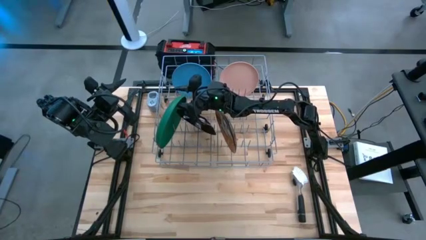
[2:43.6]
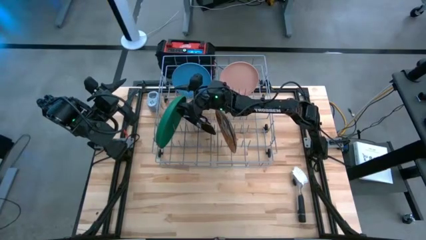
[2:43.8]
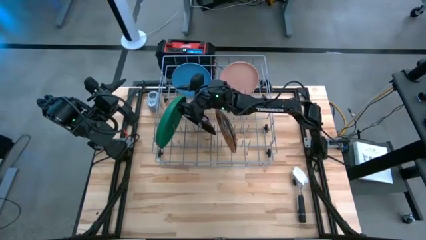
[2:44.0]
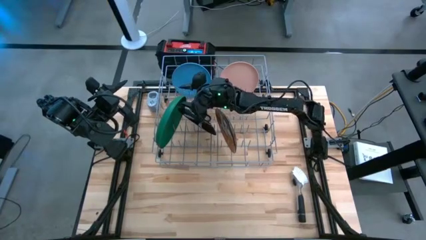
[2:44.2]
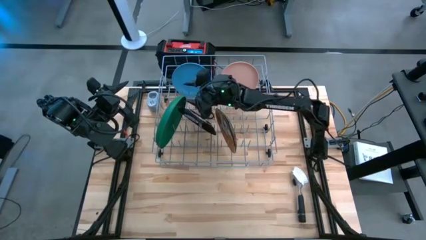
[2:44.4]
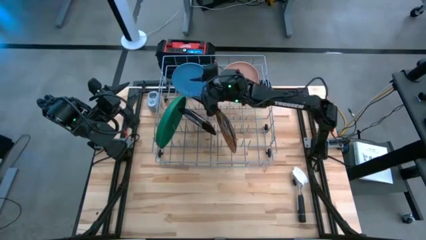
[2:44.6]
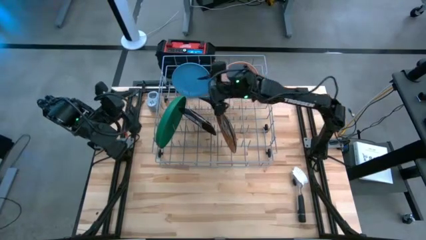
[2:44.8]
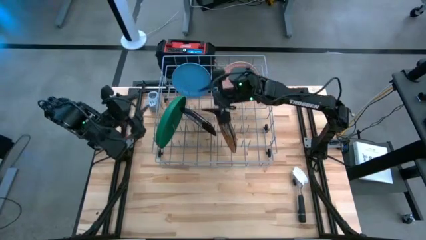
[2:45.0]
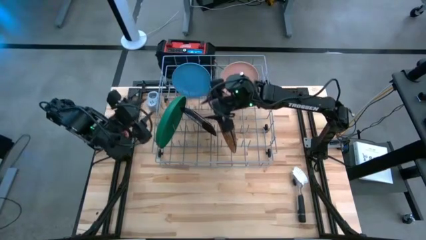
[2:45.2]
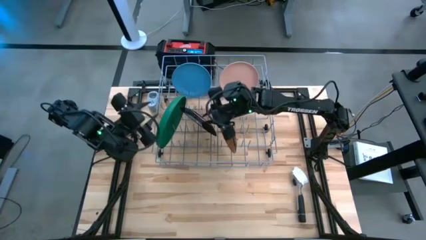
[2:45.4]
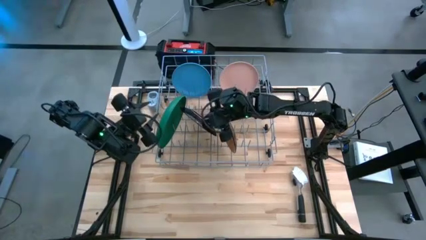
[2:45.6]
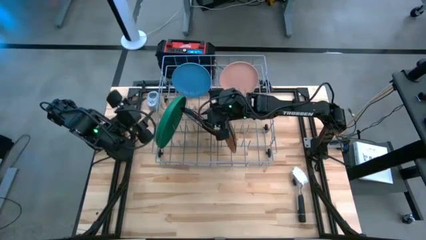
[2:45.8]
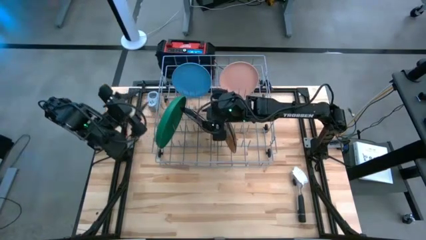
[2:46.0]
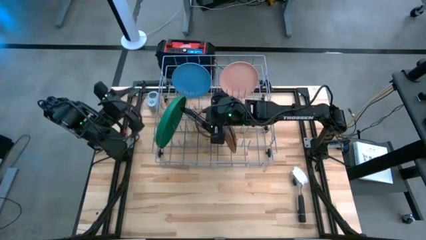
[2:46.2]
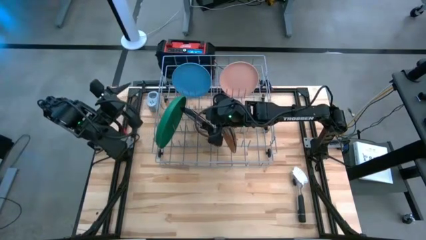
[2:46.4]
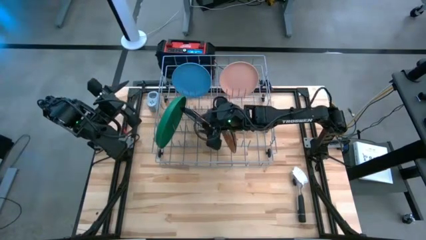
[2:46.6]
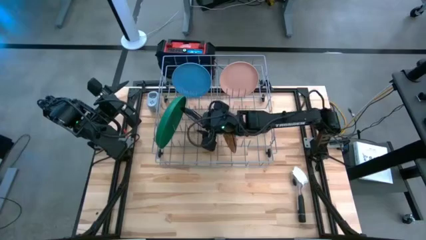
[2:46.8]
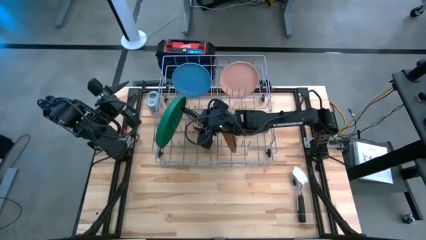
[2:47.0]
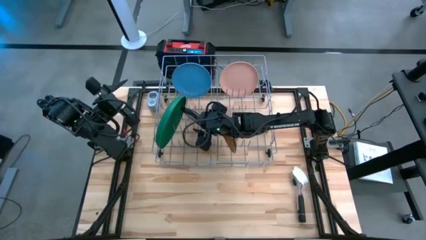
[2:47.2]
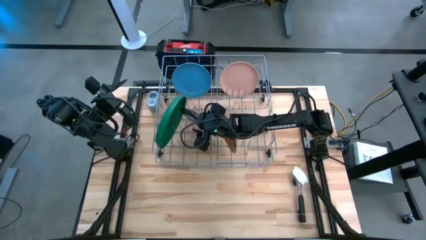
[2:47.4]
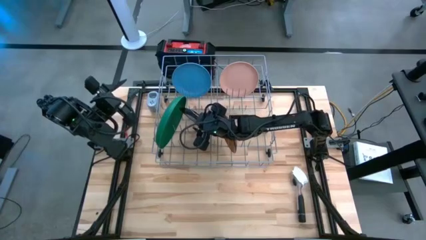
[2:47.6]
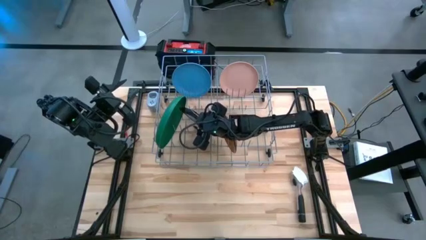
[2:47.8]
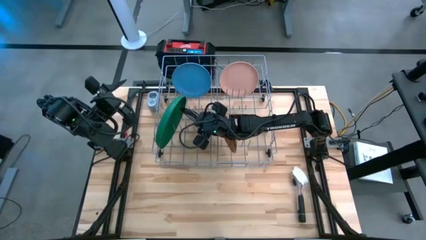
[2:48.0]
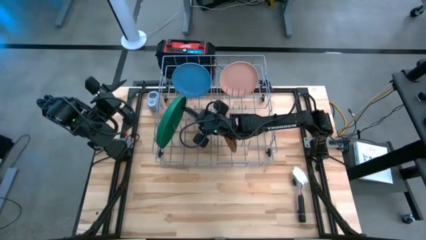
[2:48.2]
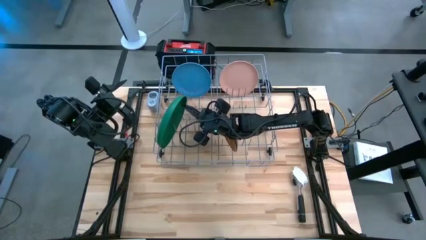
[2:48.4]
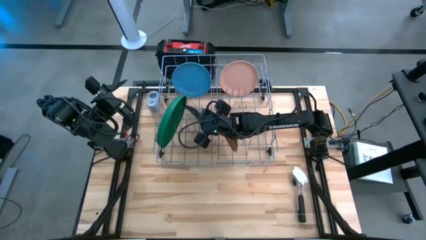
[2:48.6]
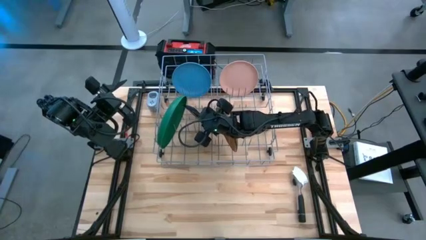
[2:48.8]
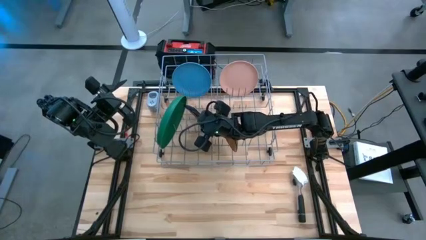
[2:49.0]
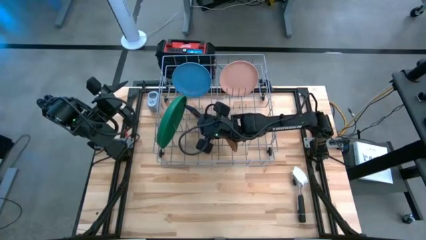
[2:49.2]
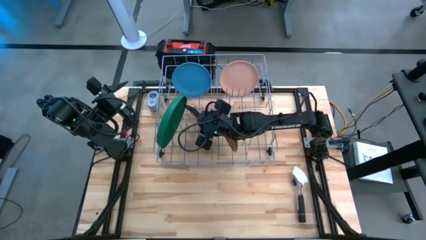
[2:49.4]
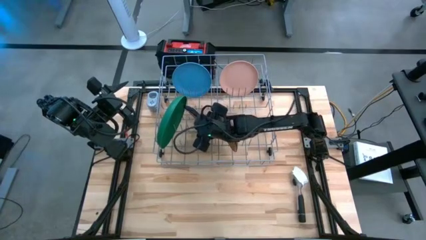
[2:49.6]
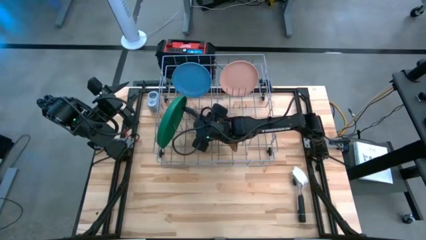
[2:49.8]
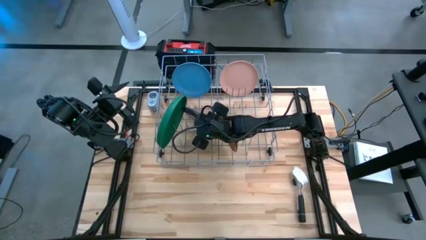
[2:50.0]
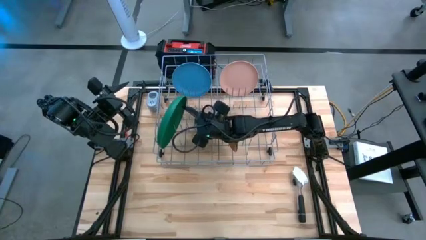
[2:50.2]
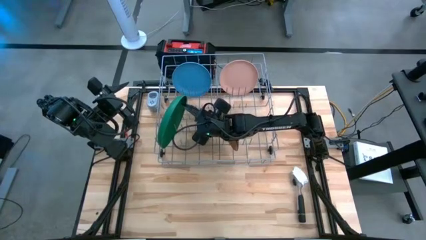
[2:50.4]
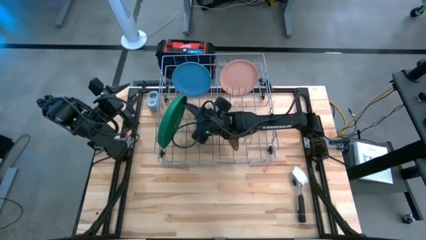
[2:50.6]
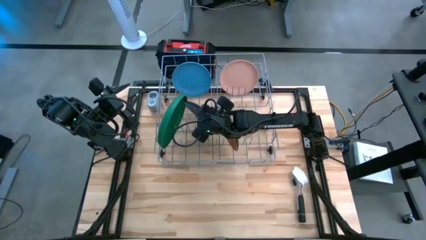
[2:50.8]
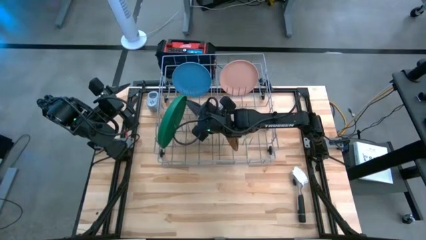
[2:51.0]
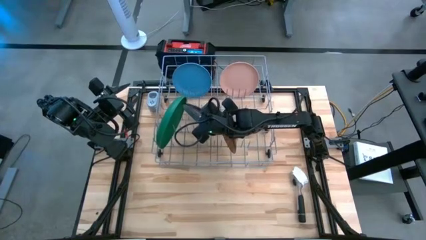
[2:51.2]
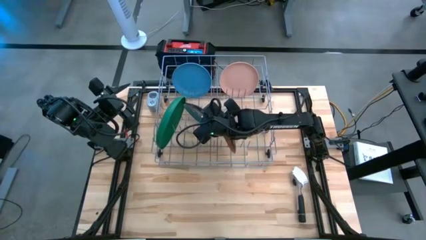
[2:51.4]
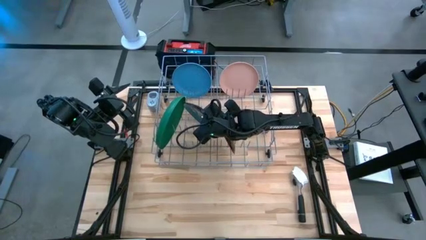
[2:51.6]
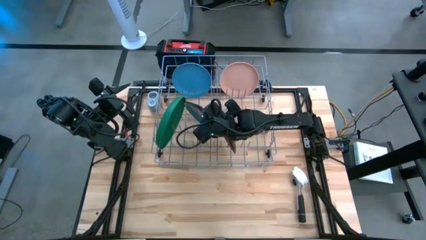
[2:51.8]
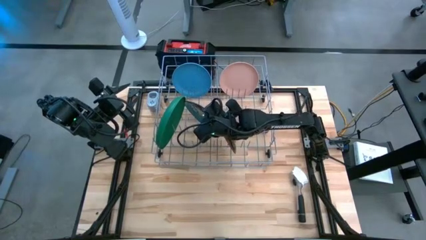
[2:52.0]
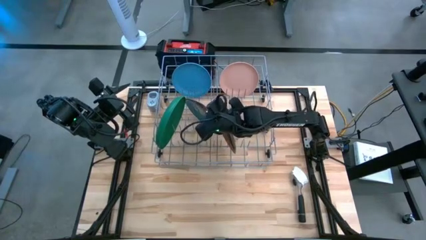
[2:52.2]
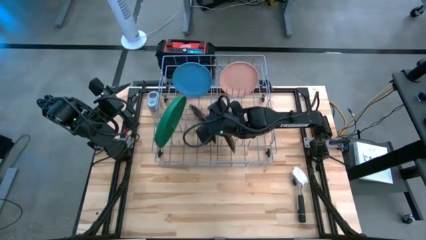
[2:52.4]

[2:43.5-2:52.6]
Task: Sort dishes
Adjust the blue floral plate on the right side of the dish rack

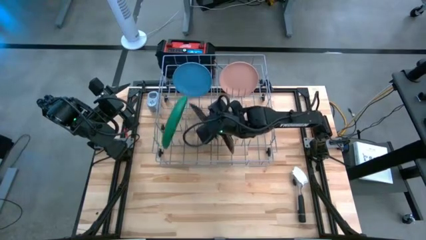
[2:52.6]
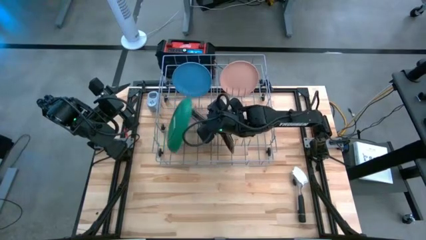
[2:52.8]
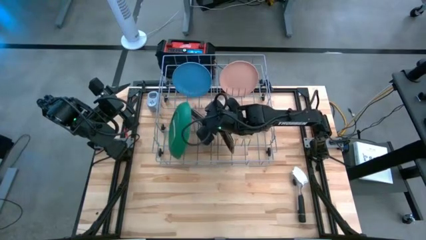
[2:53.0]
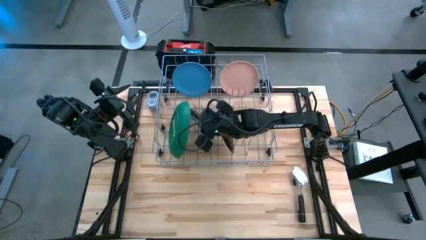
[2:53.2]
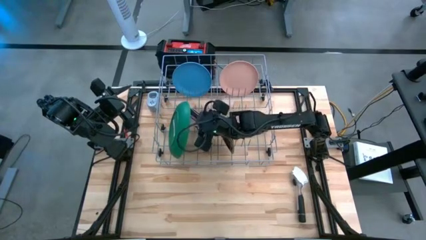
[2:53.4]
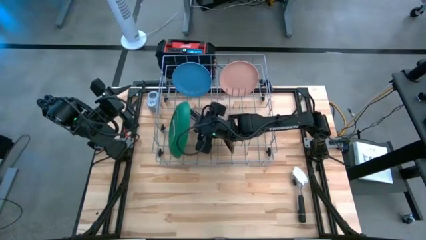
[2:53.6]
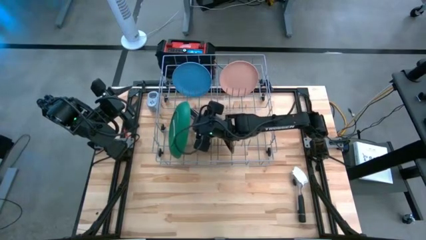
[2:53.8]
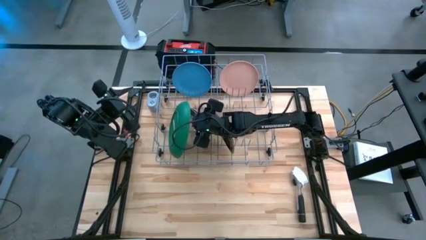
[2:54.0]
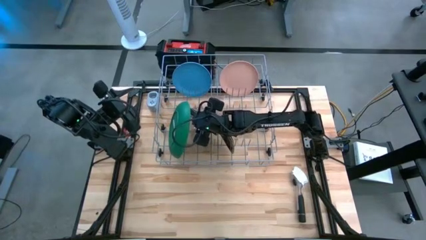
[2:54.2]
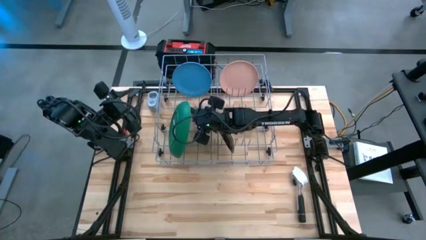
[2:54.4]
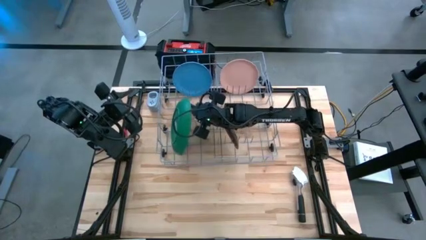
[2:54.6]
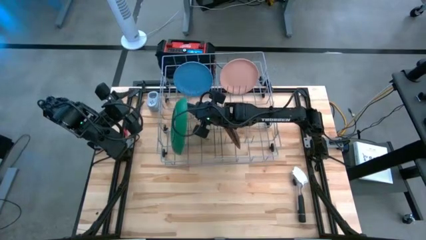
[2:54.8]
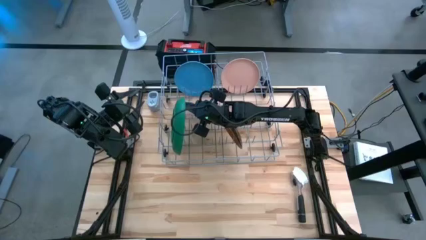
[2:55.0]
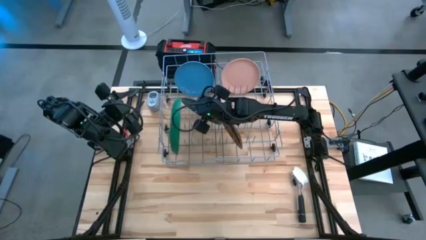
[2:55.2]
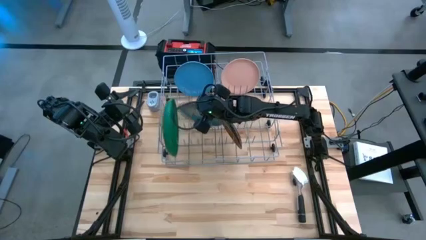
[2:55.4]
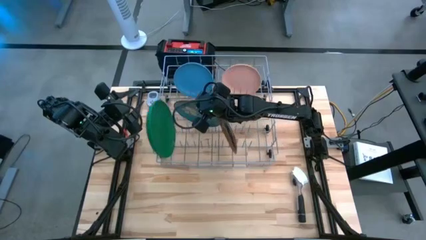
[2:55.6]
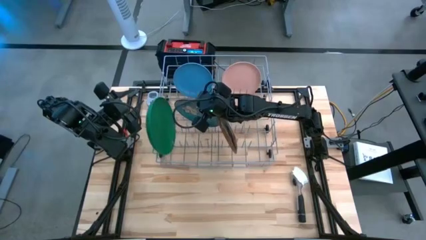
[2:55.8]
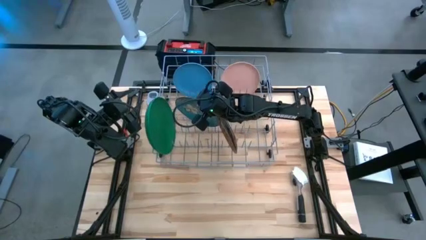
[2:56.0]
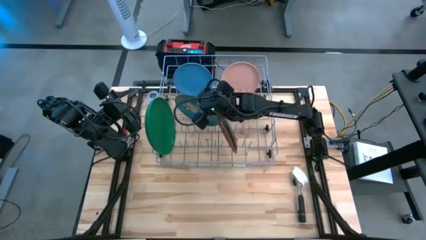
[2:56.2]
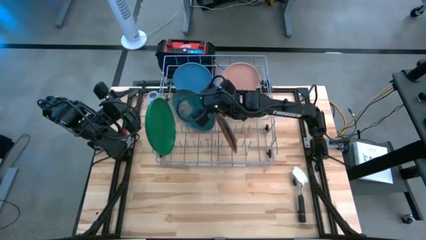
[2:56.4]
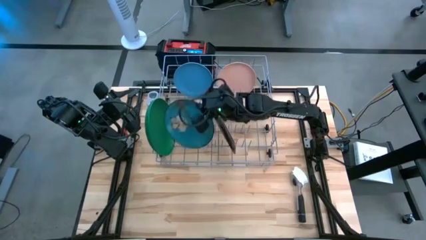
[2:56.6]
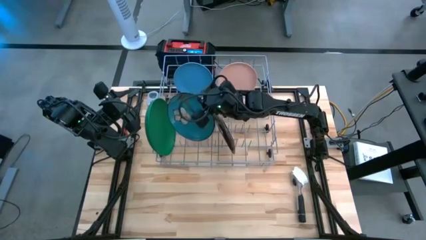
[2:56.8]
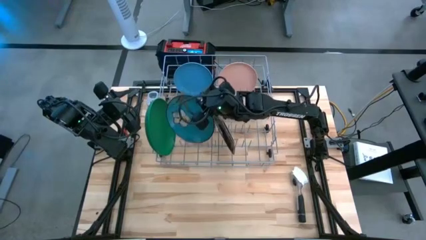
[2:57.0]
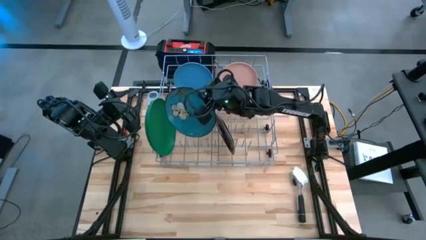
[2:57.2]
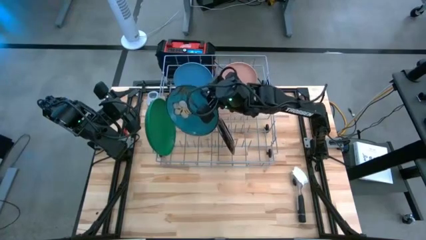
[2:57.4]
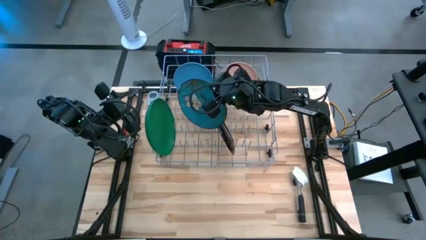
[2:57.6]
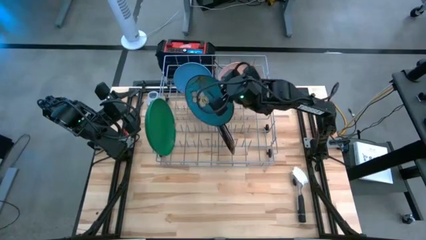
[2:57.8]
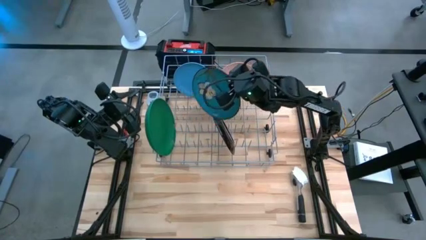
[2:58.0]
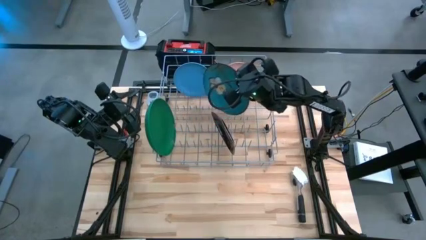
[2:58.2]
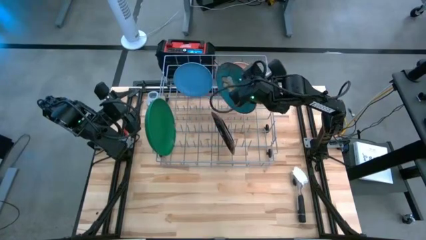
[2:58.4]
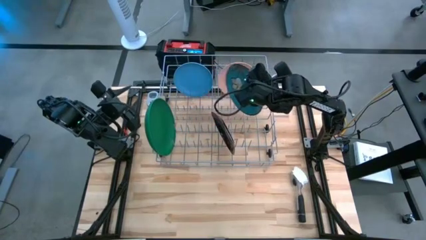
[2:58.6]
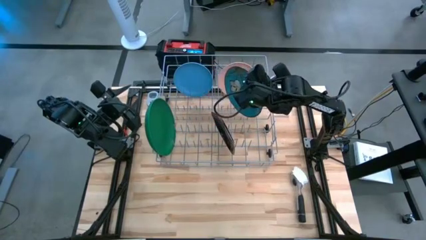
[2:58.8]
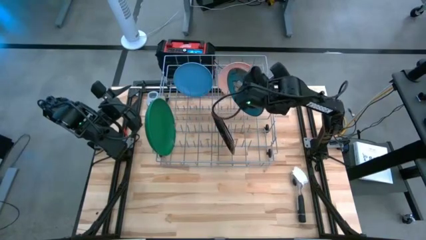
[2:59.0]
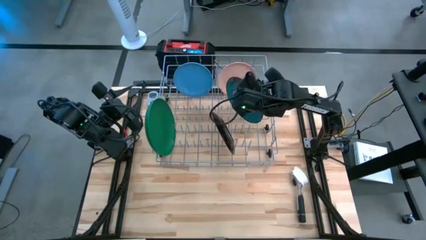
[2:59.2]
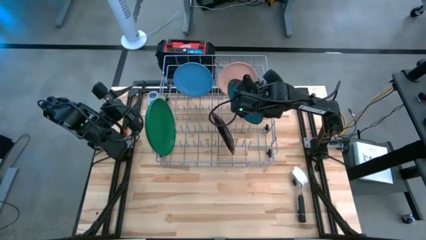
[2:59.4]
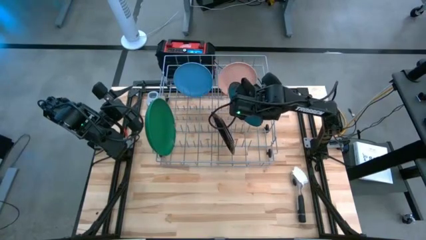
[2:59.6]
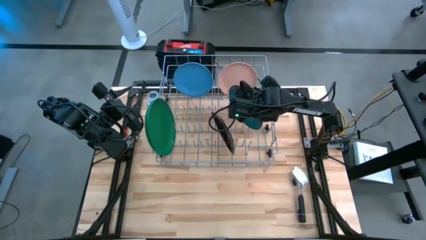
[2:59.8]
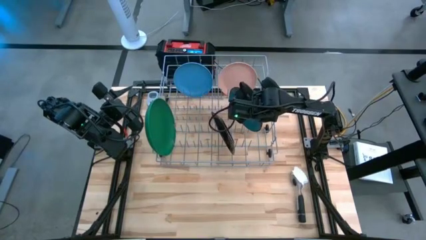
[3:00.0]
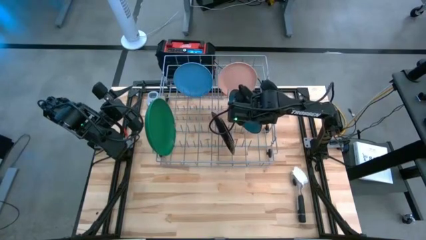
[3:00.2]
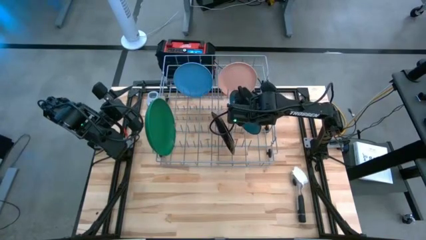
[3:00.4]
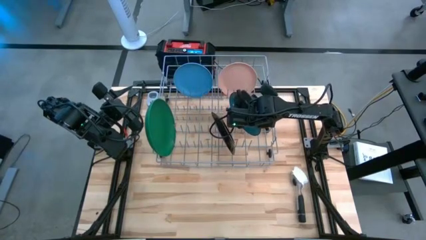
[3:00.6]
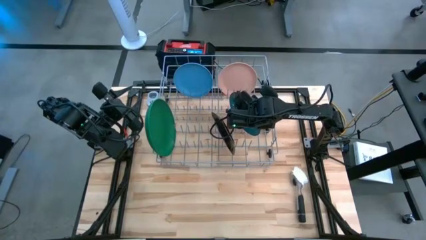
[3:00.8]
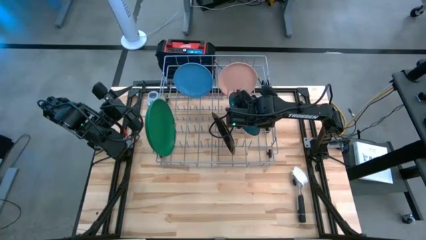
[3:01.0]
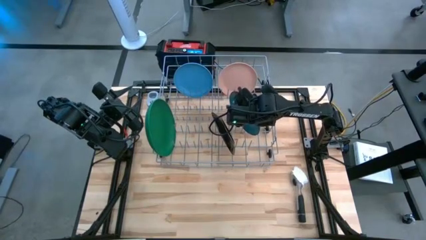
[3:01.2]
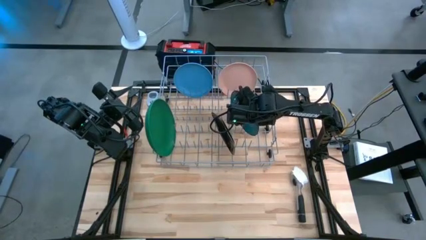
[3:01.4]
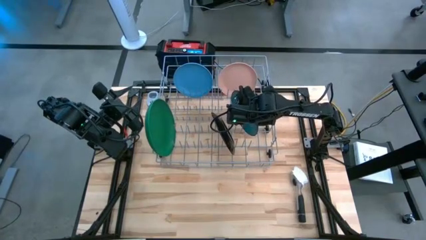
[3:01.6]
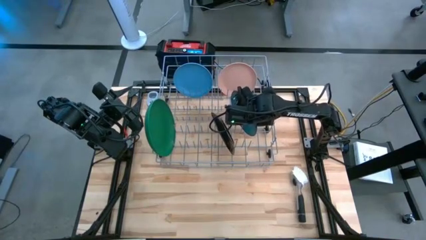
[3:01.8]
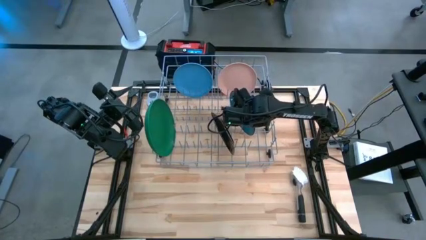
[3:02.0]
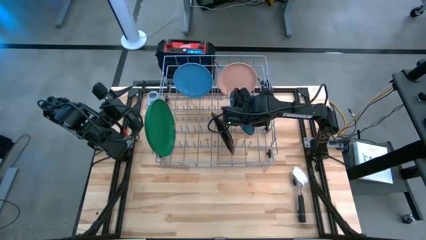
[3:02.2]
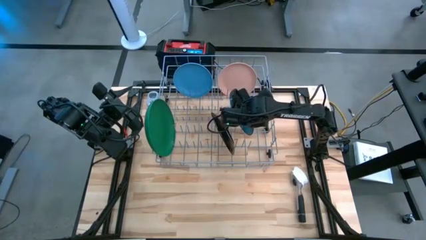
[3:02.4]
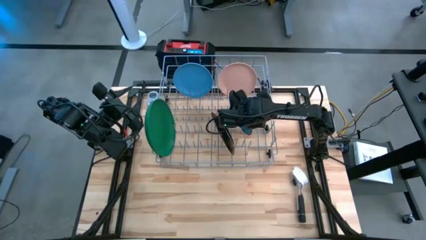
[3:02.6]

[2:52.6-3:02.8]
Adjust the blue floral plate on the right side of the dish rack
